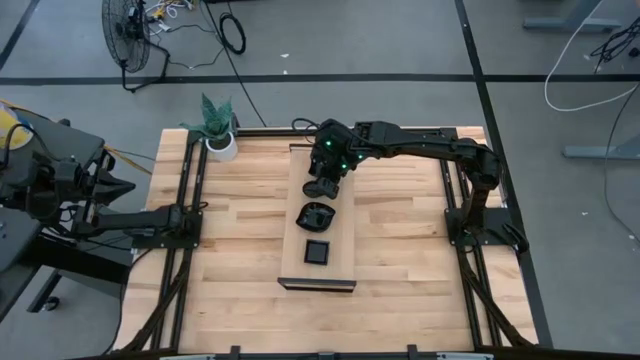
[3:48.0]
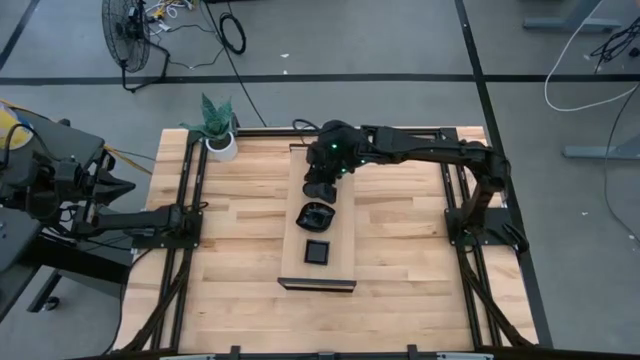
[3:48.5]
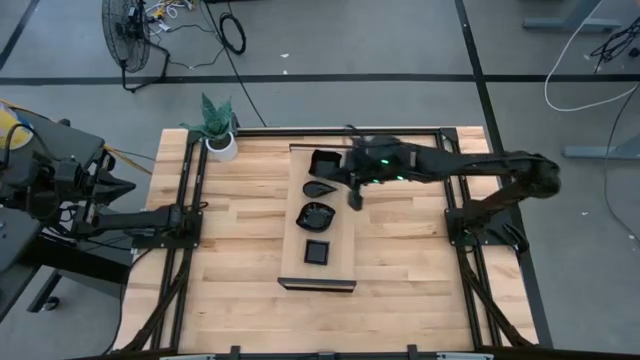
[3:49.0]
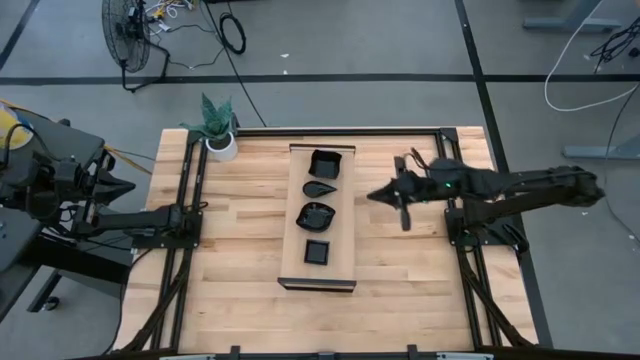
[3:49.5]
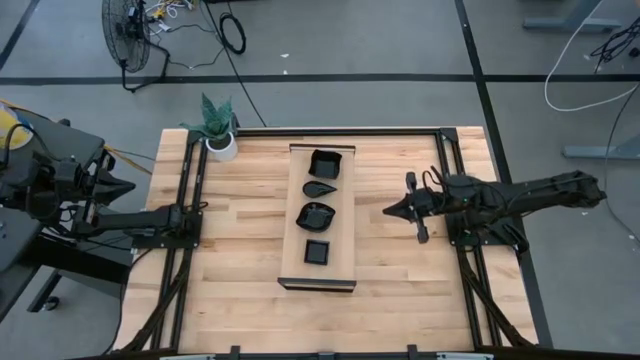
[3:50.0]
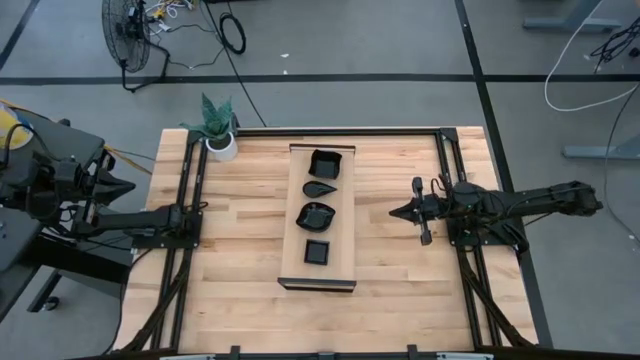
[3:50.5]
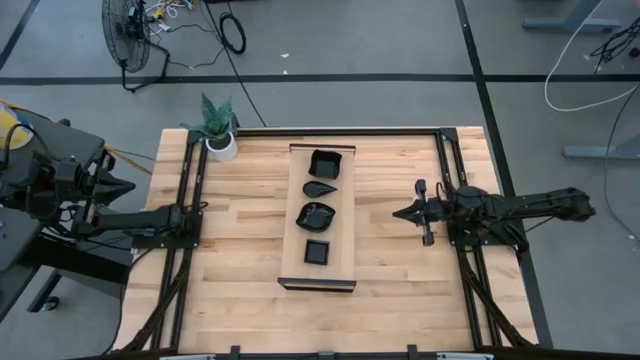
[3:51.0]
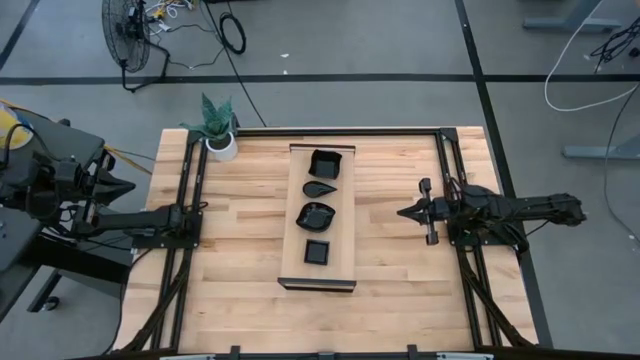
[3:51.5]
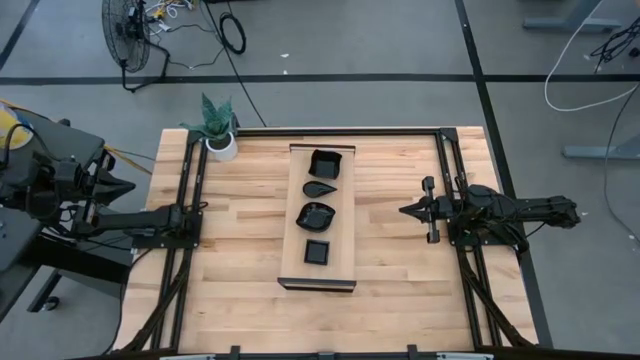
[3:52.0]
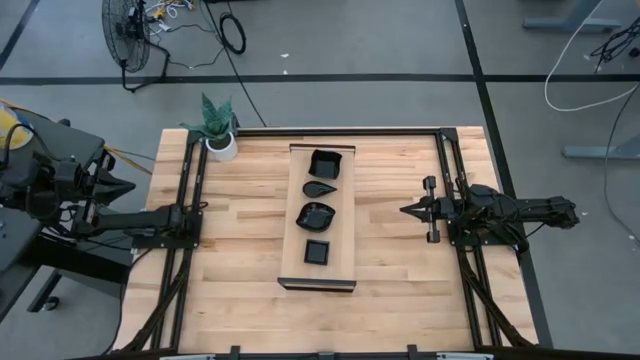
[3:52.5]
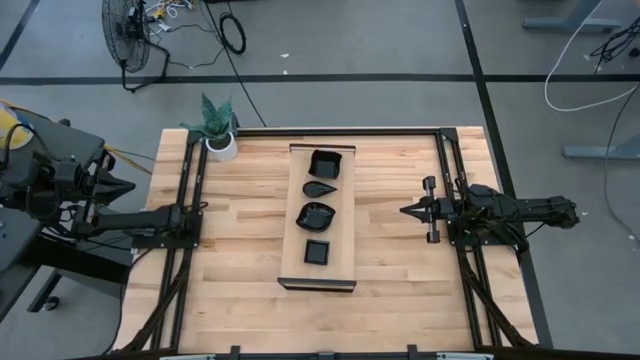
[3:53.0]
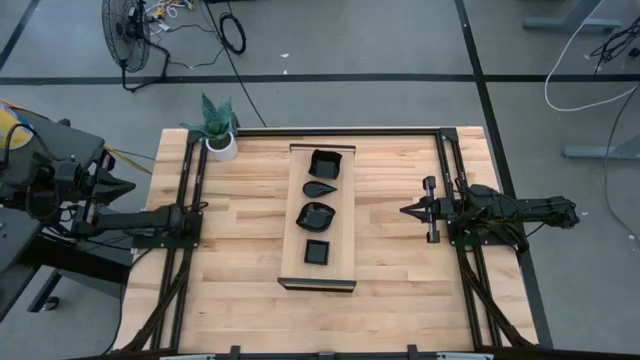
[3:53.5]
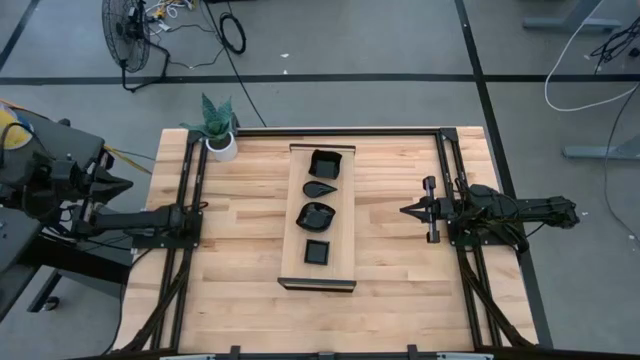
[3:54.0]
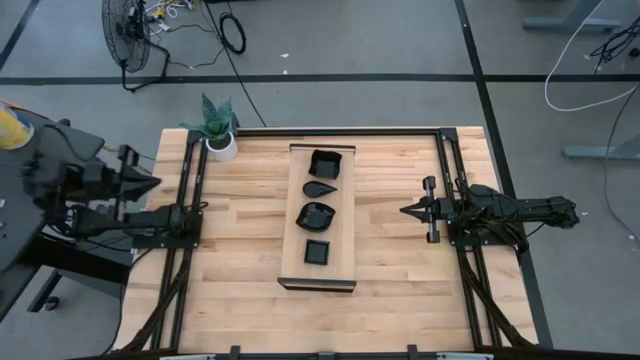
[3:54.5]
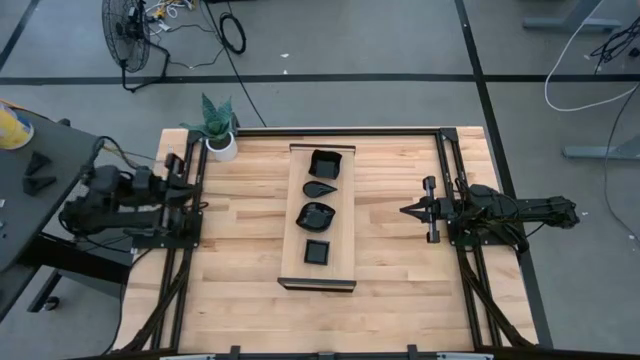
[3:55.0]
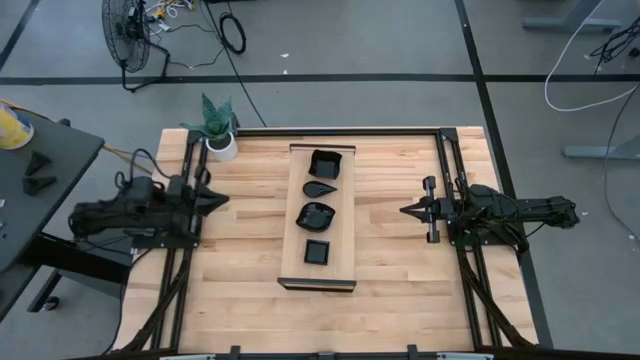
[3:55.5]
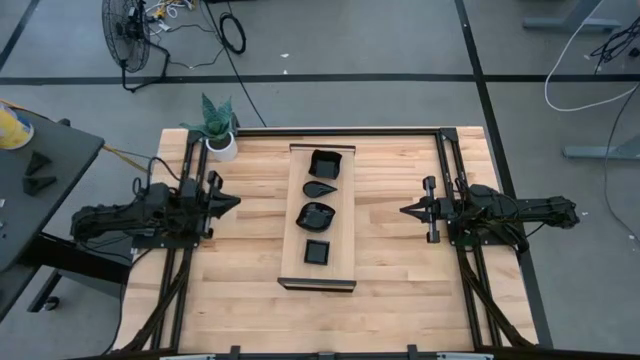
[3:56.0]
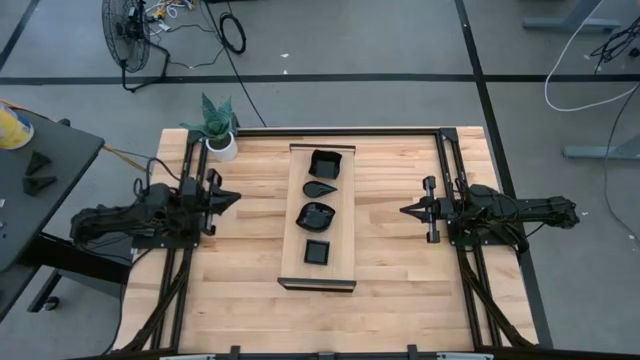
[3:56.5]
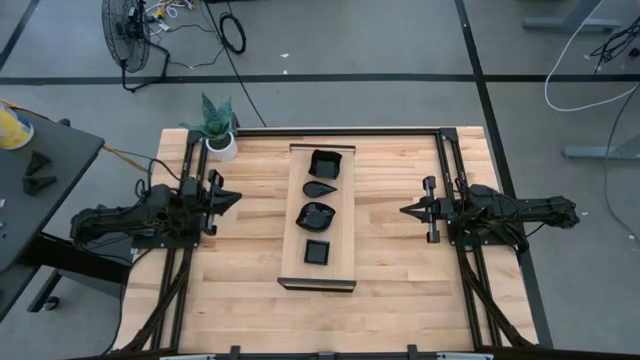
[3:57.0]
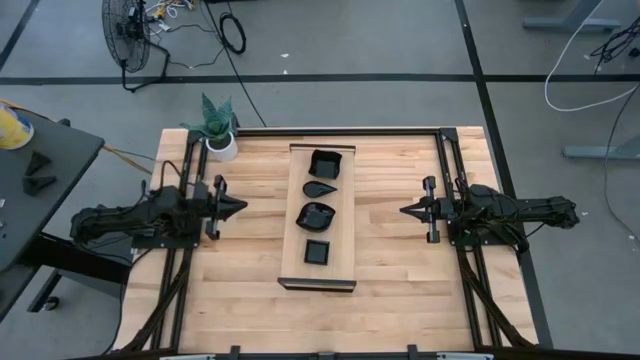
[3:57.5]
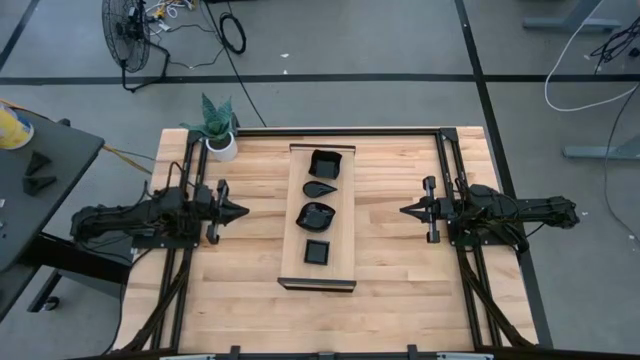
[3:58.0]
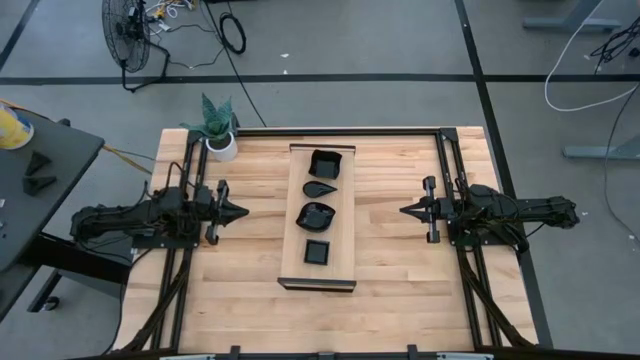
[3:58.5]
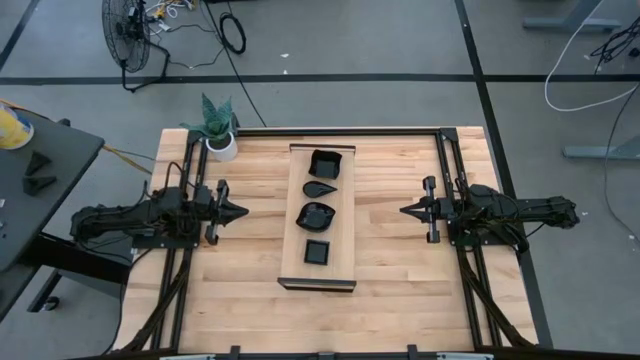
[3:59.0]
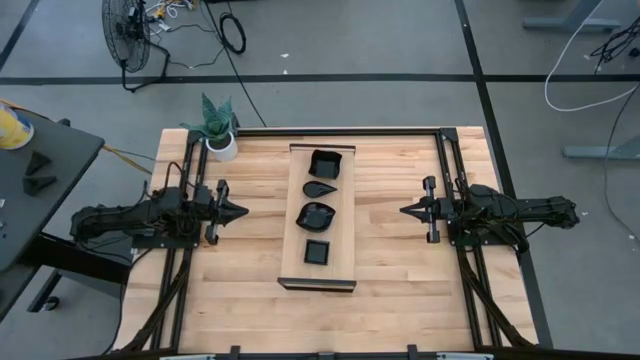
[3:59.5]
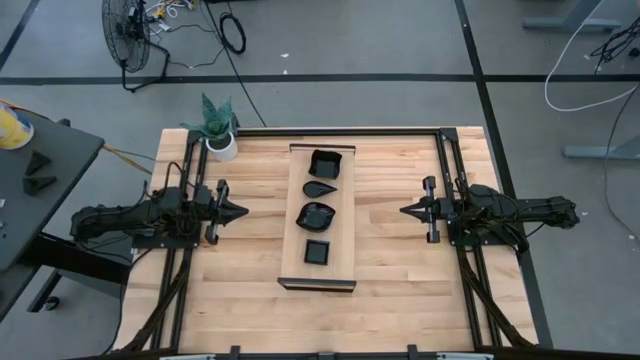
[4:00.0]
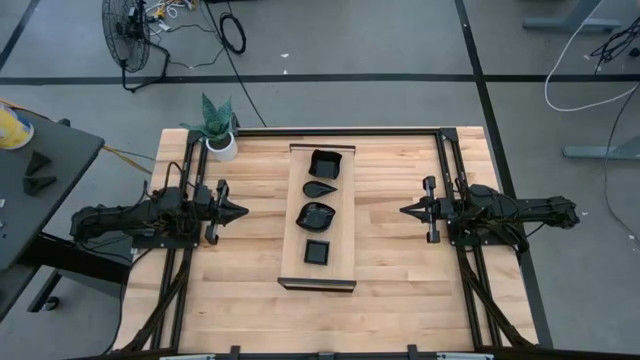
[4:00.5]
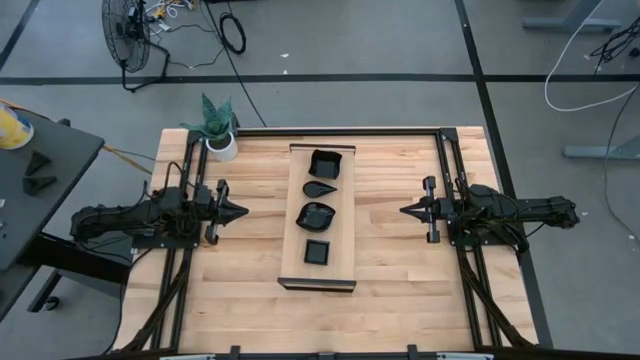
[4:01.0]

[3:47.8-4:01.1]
Task: Pick & Place Mini shaped plates
Return to Home Position

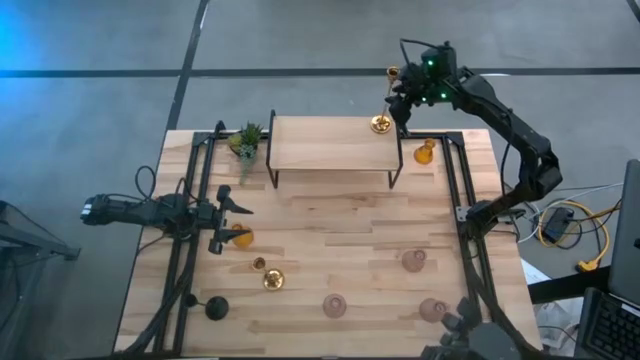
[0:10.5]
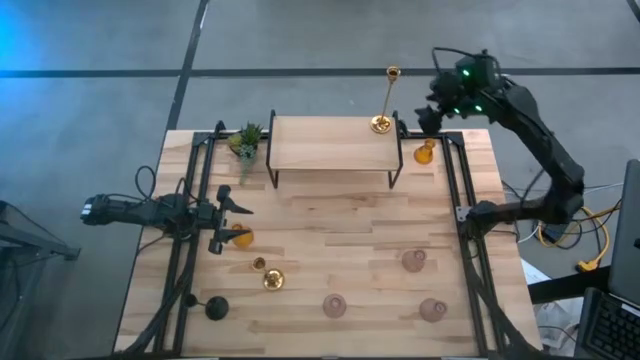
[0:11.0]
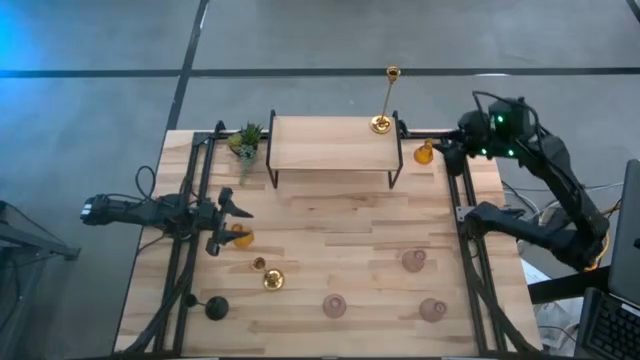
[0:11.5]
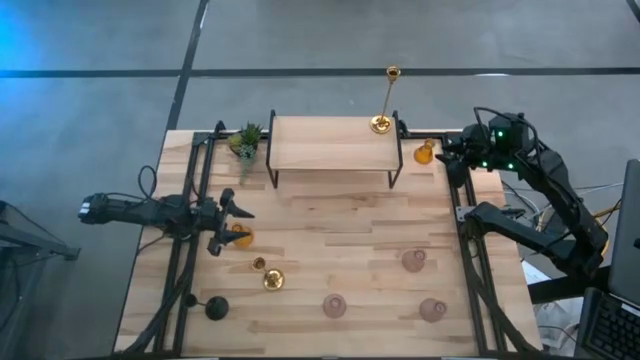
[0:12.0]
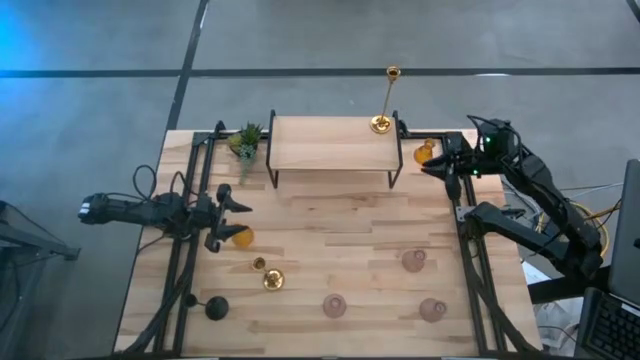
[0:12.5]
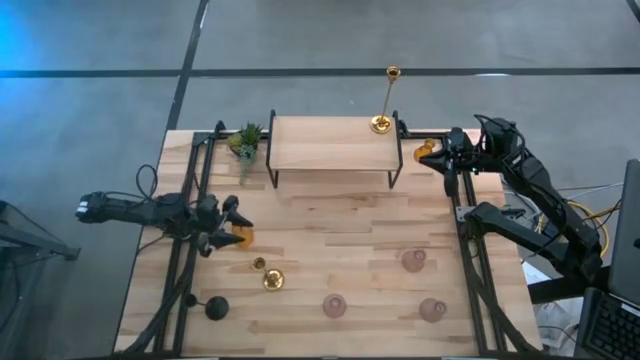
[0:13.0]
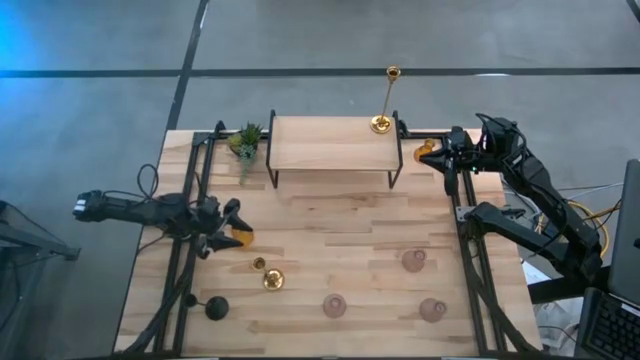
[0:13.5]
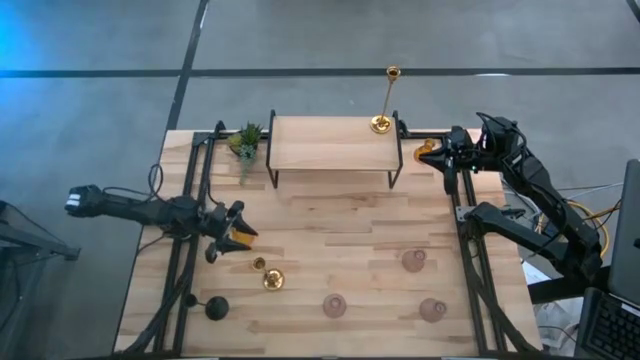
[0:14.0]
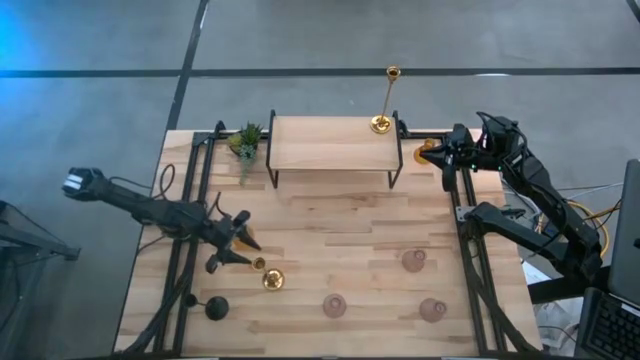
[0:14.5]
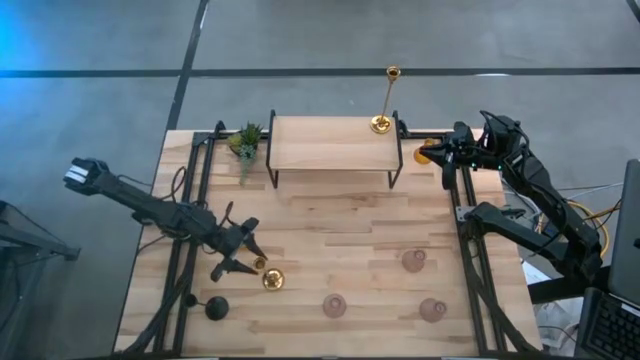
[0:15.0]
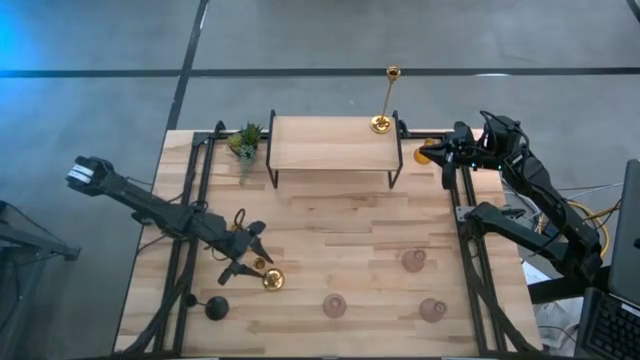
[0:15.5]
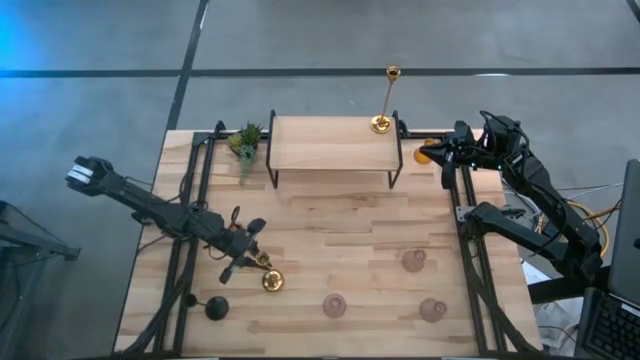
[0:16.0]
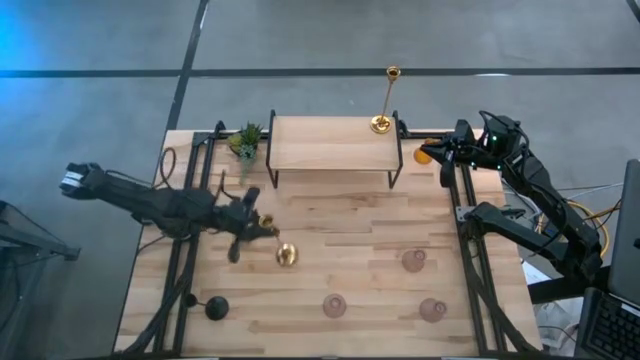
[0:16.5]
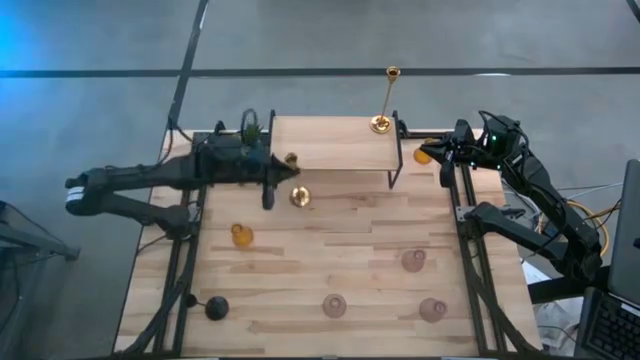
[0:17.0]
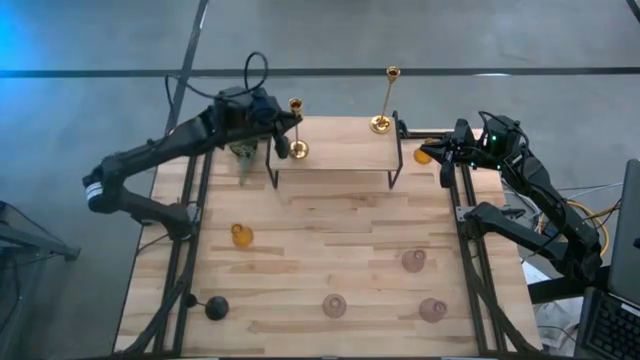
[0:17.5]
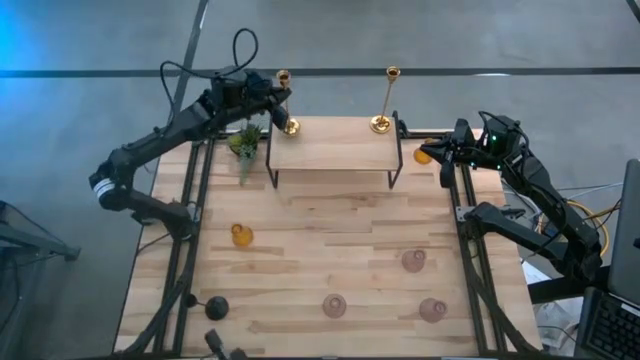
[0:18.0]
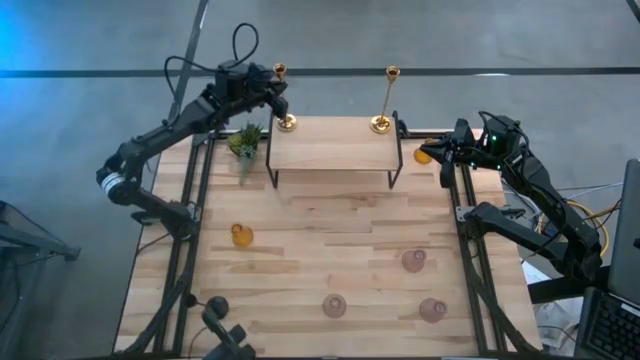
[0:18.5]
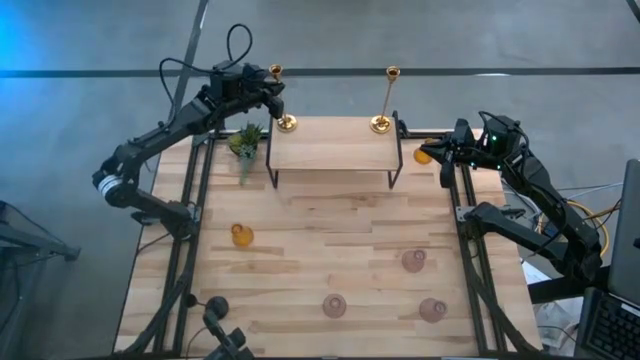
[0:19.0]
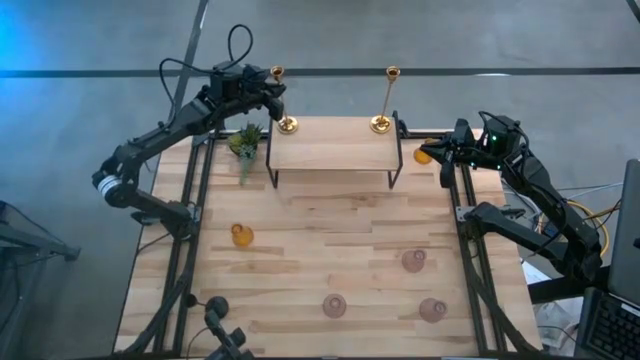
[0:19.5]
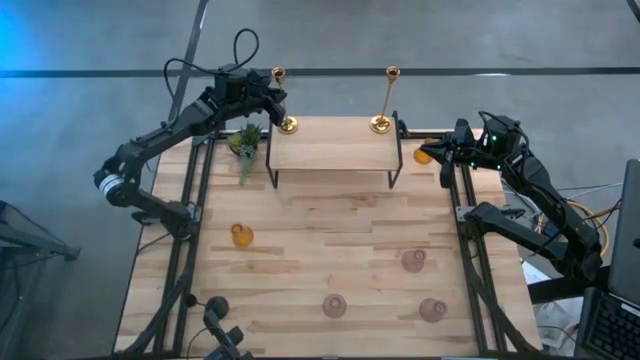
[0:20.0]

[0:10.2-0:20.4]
Task: Pick & Place candle stick holders
Put the gold candle holder on the shelf
